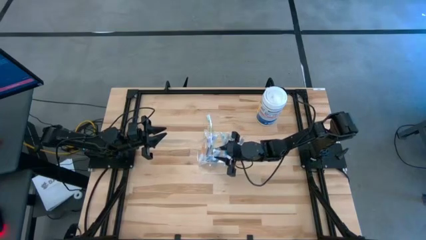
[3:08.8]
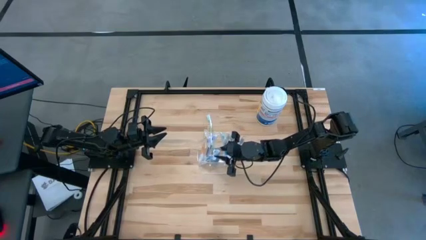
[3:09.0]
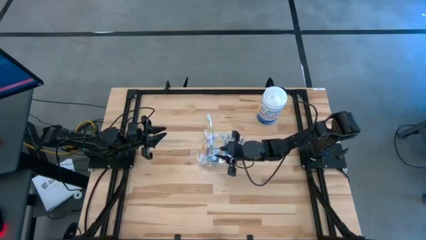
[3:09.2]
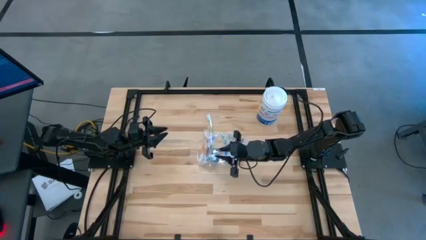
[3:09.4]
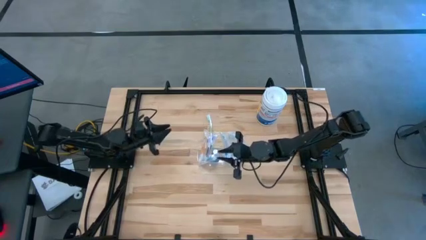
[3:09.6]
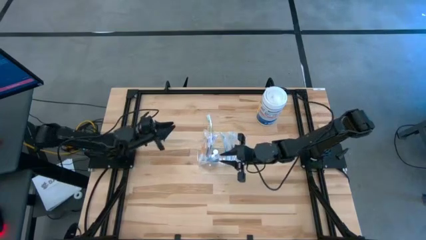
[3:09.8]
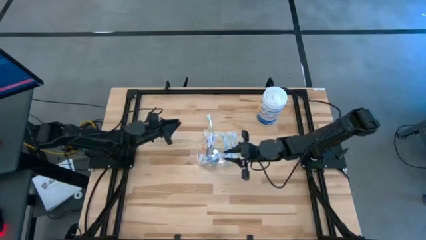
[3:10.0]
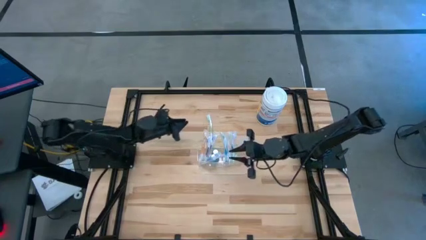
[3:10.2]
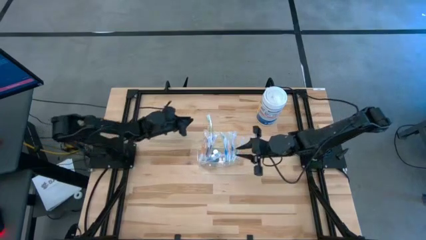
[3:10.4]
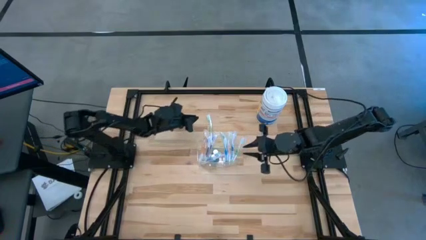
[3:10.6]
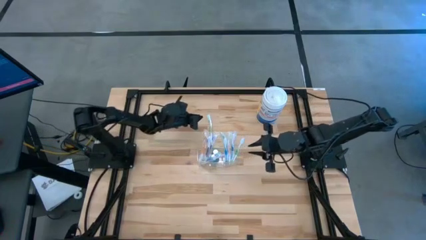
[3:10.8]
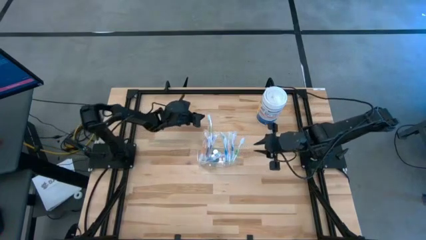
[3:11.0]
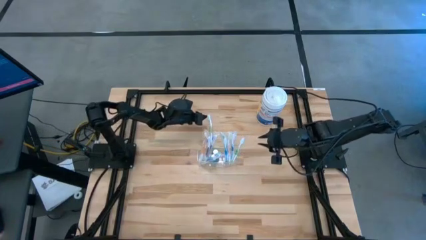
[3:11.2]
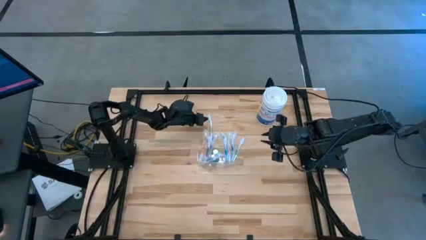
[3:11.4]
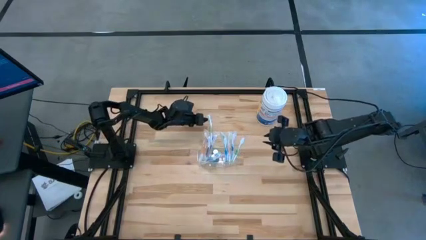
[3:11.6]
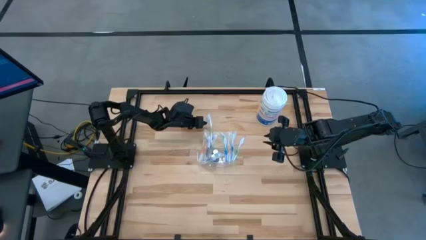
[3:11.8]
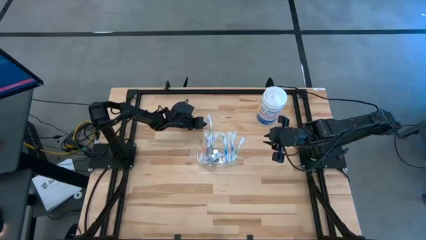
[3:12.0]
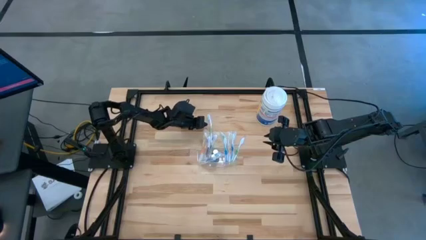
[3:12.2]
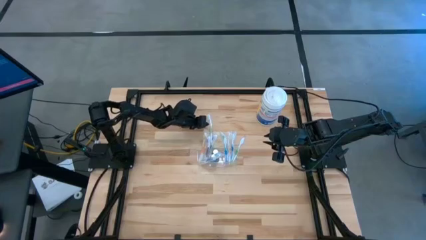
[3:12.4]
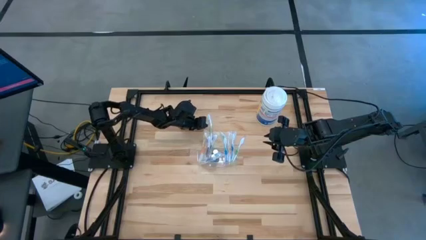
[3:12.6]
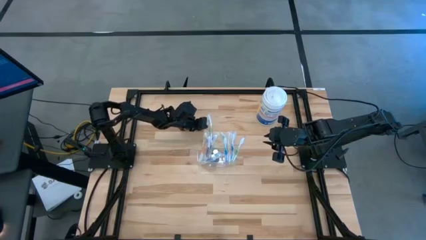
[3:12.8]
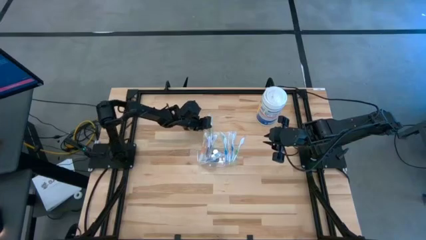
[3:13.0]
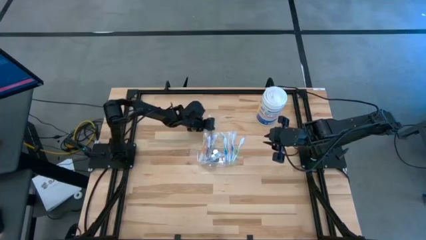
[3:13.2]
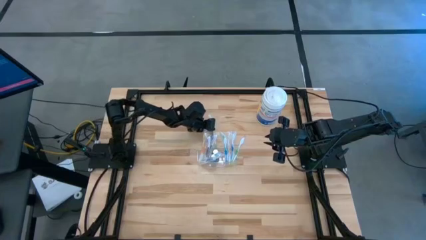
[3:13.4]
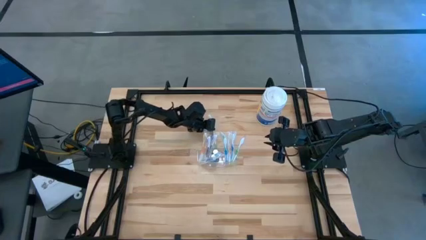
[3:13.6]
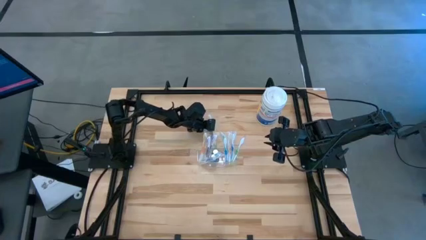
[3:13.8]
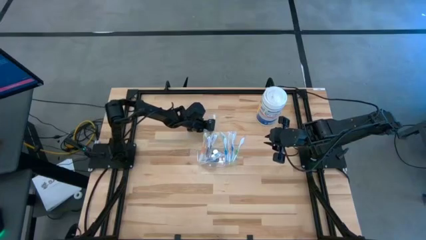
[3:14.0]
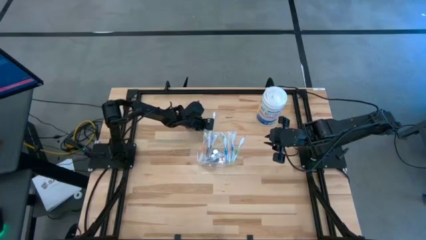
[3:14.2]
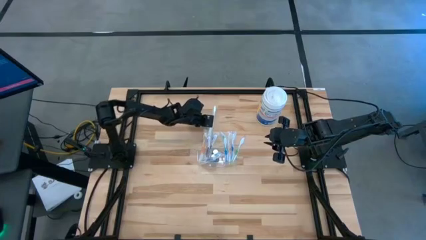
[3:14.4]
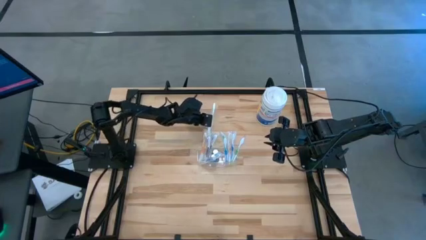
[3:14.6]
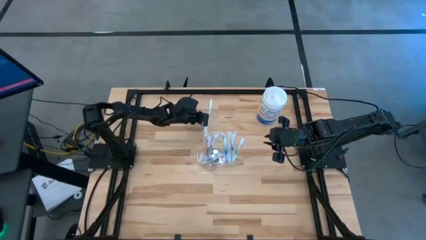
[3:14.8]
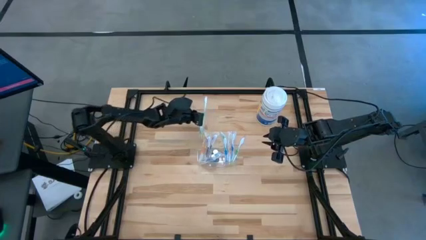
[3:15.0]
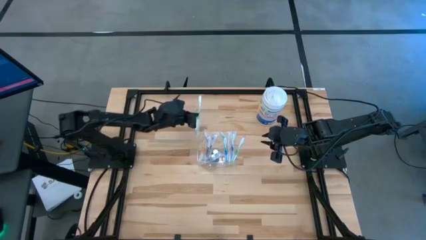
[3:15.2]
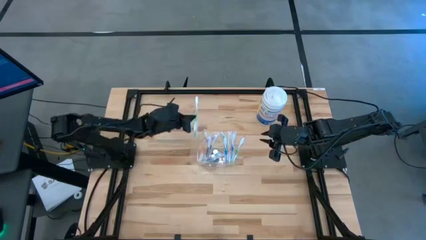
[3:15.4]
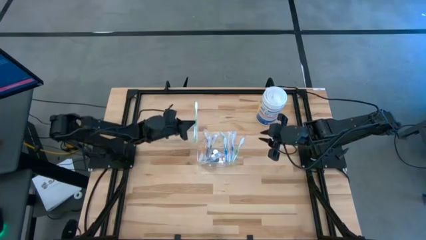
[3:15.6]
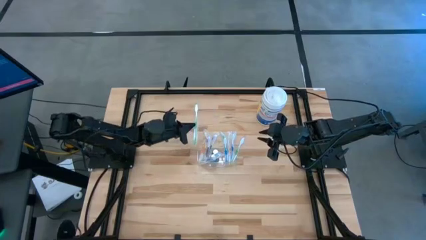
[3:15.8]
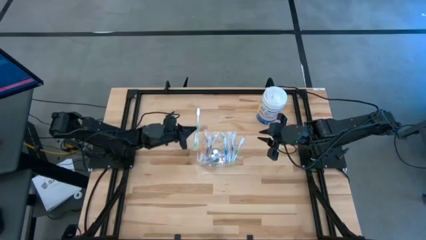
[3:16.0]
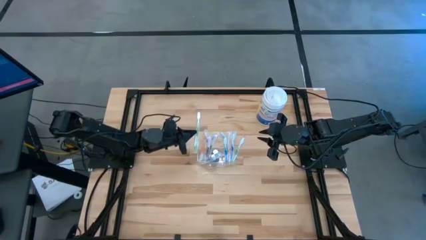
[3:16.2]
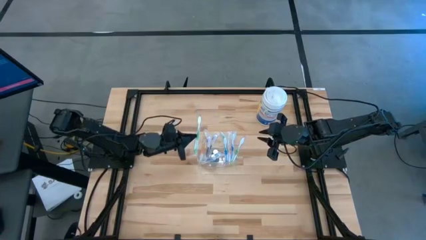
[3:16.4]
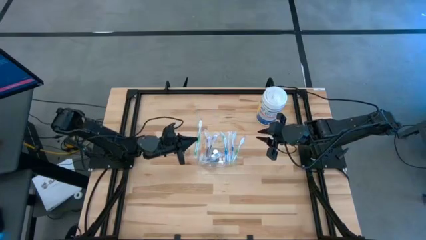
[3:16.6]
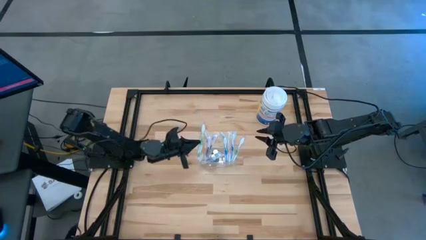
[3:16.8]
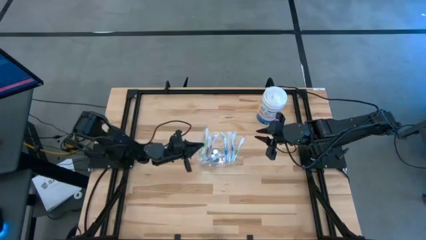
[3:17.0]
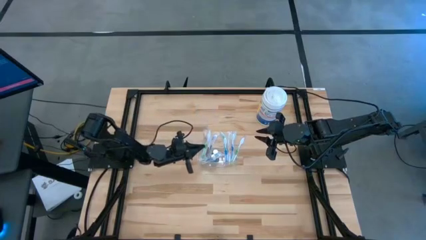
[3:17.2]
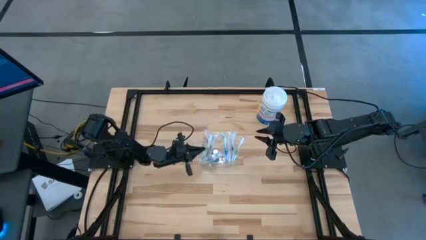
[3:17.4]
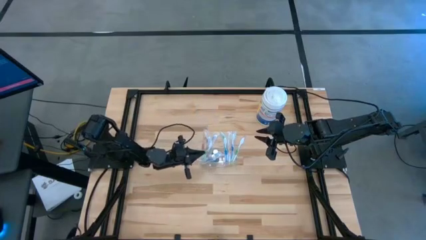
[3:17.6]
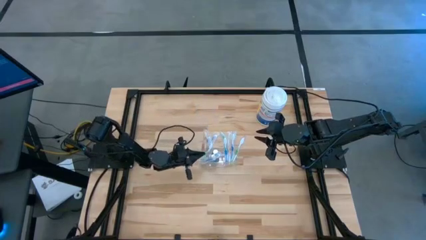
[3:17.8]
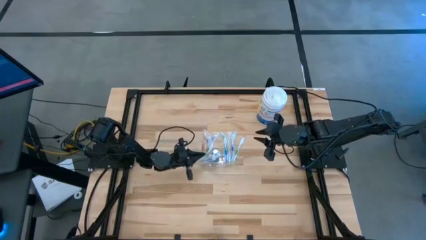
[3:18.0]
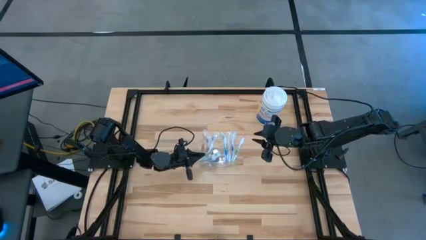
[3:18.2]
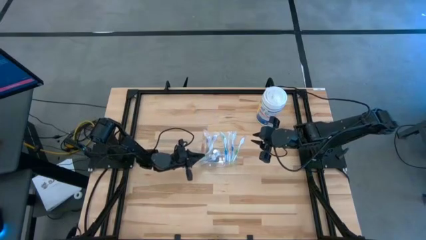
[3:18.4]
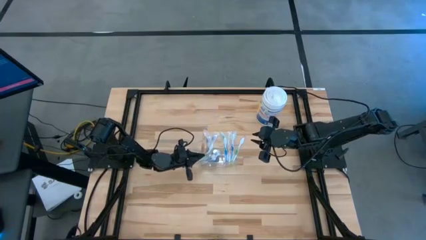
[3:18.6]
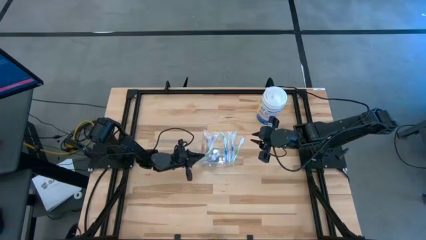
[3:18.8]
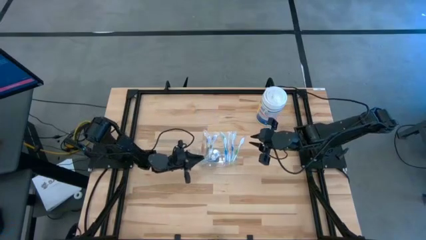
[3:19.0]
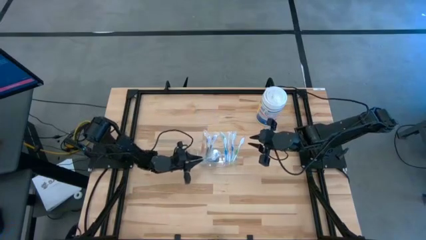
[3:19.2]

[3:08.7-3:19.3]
Task: Pick & Place toothbrushing station
Put the green toothbrush into the transparent organizer

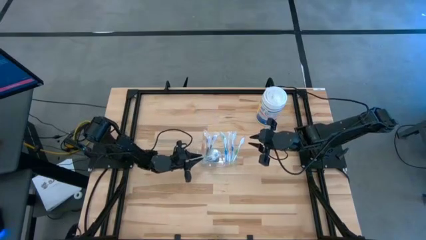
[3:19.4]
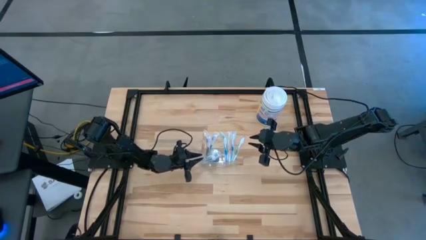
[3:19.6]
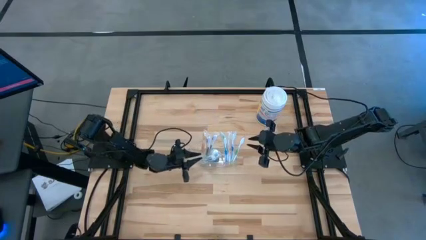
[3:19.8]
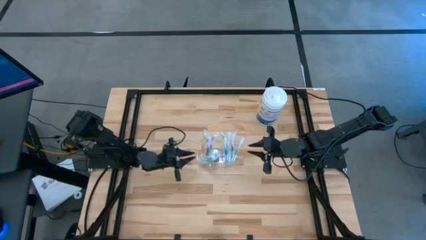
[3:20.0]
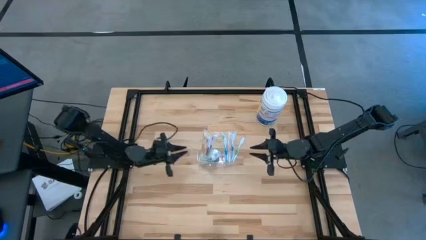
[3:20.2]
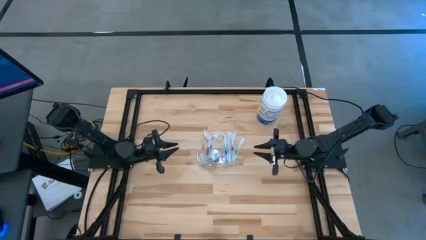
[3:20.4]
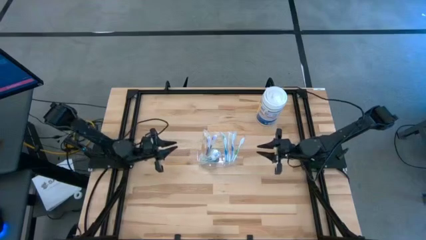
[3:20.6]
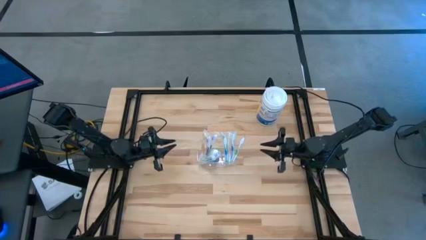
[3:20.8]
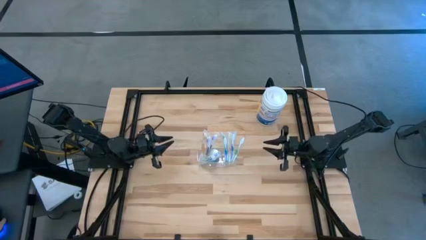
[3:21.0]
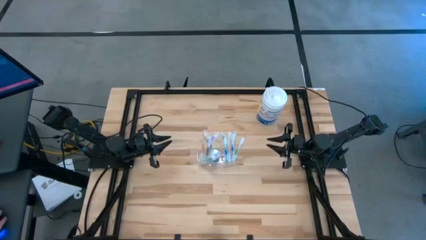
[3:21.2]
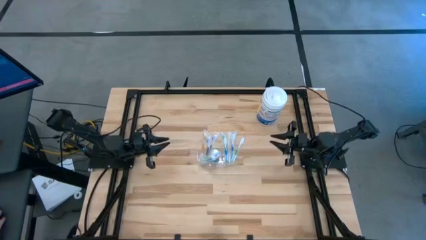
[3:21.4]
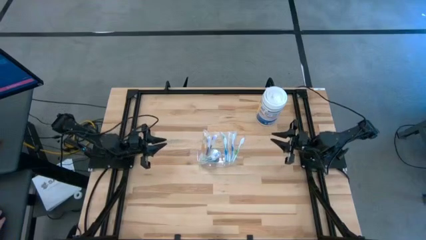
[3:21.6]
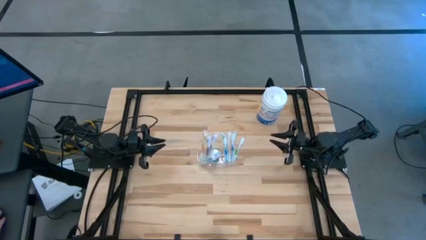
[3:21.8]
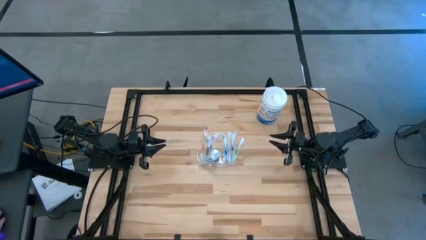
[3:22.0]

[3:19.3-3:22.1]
Return to Home Position

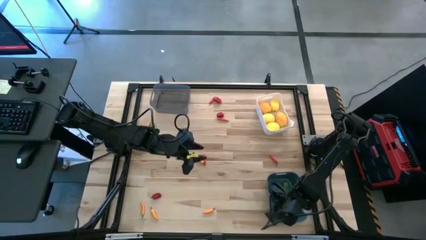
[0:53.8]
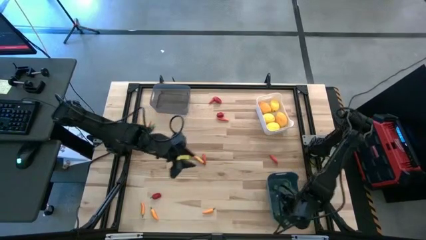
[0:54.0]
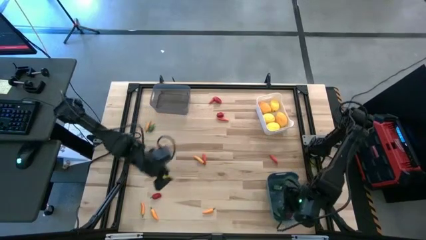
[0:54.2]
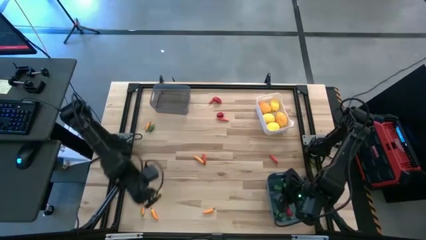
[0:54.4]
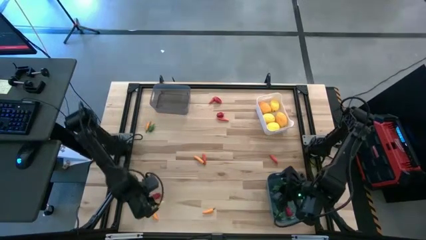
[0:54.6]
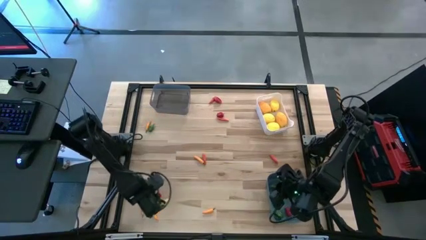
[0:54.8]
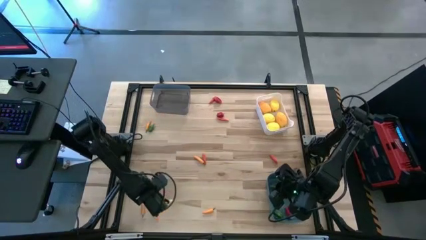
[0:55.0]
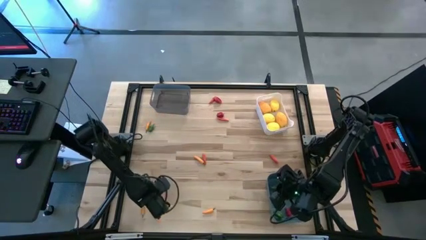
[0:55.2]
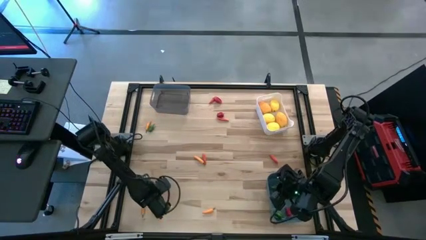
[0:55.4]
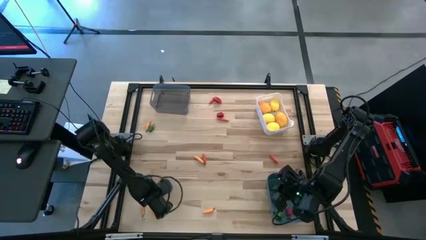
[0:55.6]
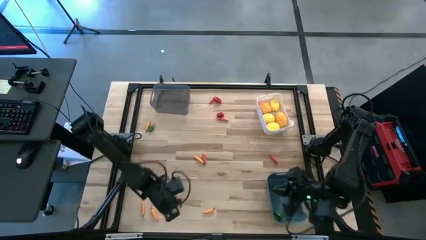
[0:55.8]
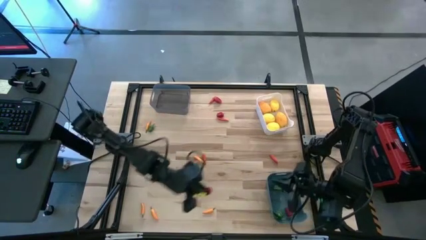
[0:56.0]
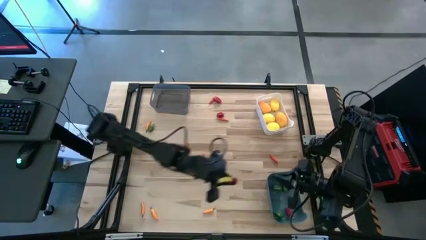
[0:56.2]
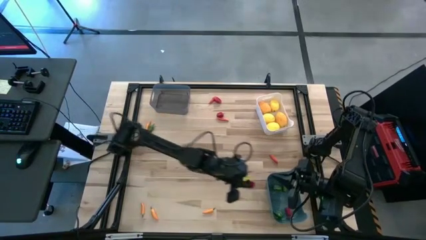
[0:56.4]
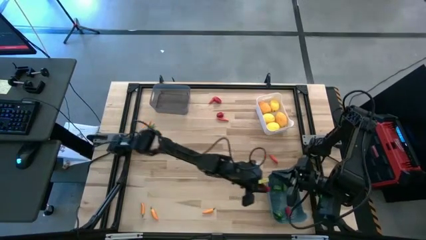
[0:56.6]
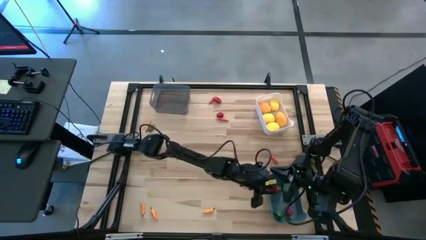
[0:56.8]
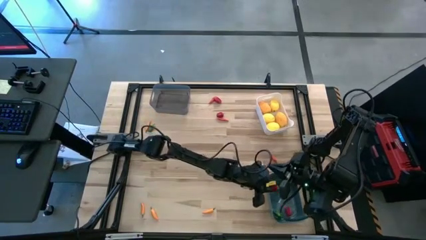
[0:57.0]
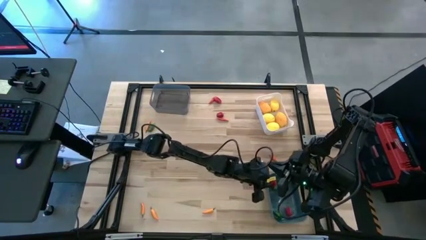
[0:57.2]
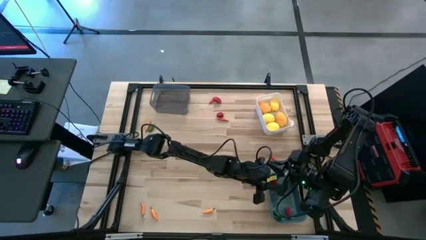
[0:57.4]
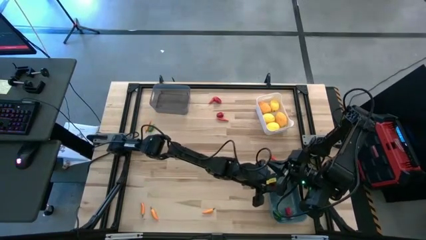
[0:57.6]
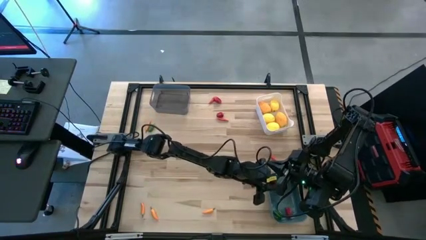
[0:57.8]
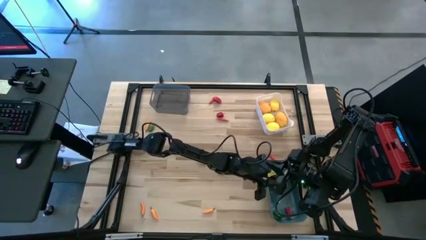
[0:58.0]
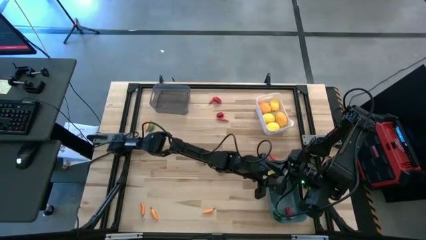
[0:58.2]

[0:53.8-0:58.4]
Task: Sort produce into baskets
Put the red chili pepper into the blue bin
